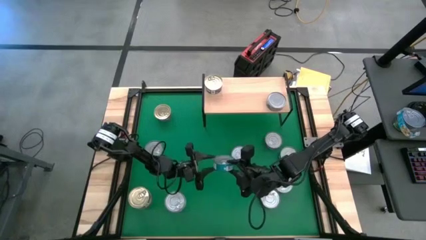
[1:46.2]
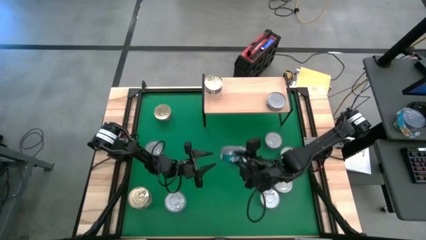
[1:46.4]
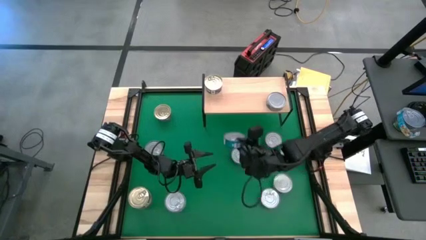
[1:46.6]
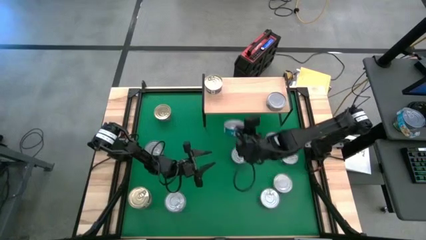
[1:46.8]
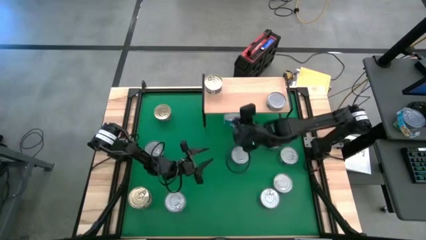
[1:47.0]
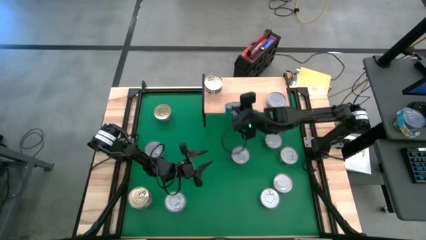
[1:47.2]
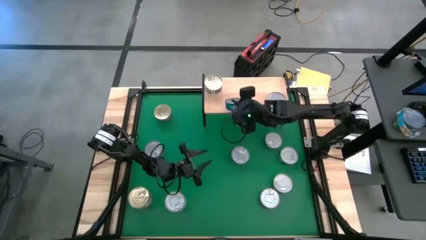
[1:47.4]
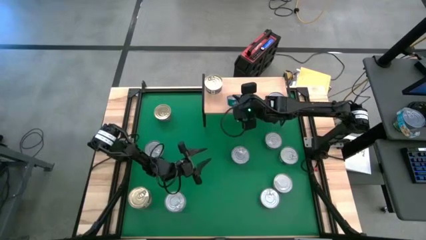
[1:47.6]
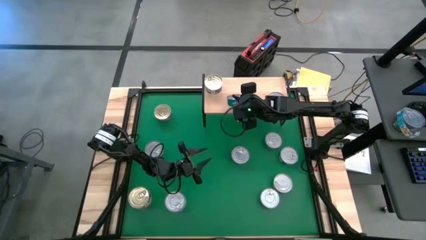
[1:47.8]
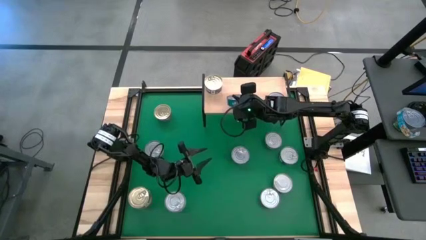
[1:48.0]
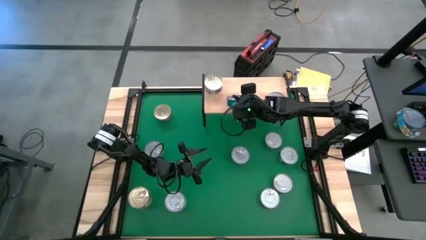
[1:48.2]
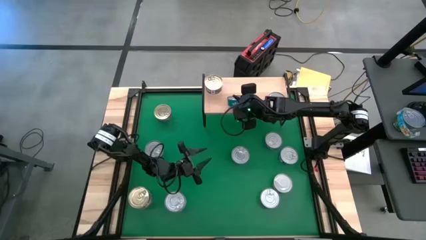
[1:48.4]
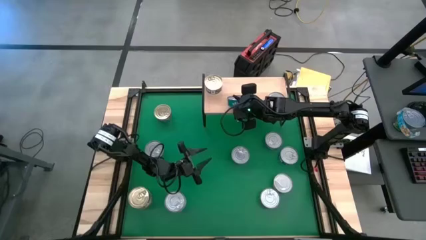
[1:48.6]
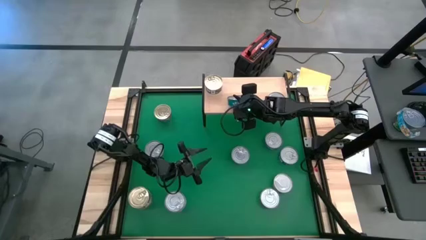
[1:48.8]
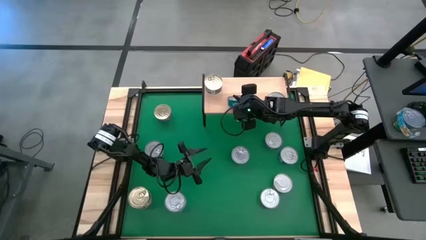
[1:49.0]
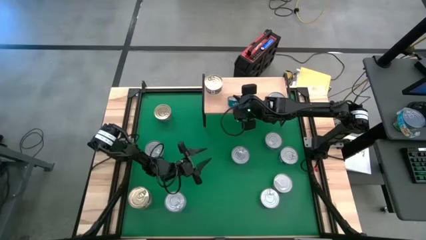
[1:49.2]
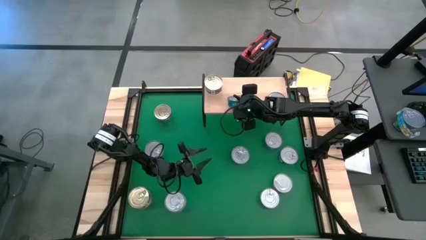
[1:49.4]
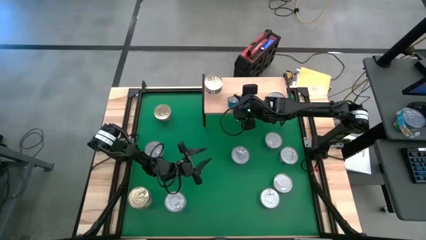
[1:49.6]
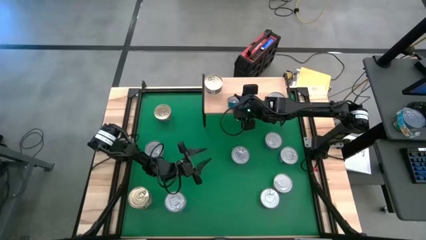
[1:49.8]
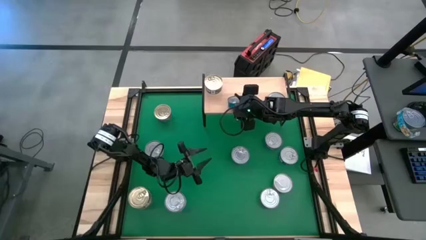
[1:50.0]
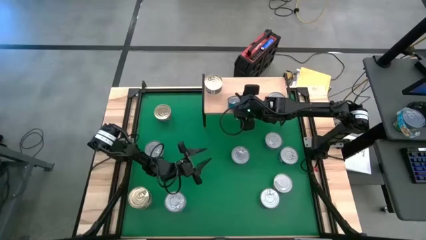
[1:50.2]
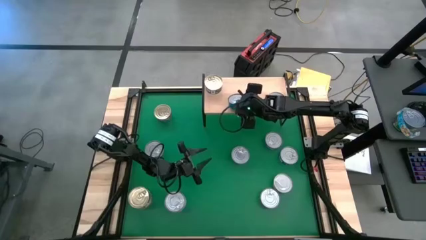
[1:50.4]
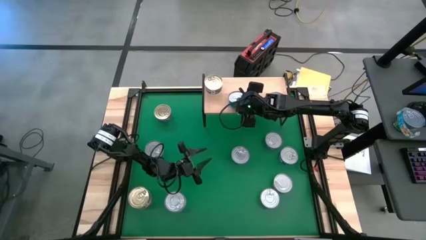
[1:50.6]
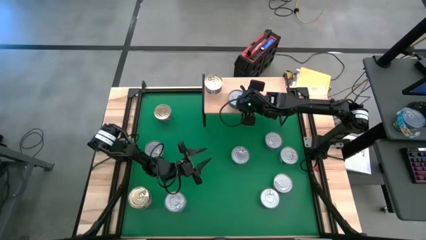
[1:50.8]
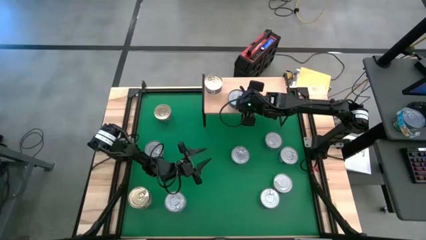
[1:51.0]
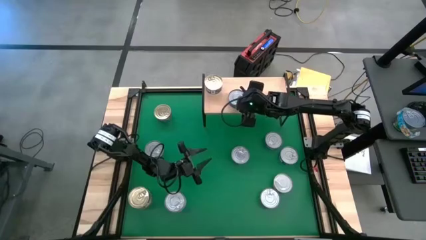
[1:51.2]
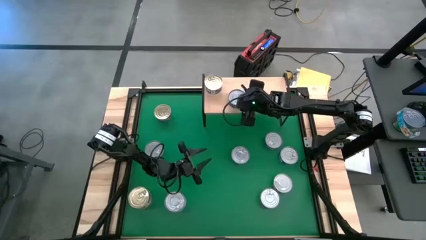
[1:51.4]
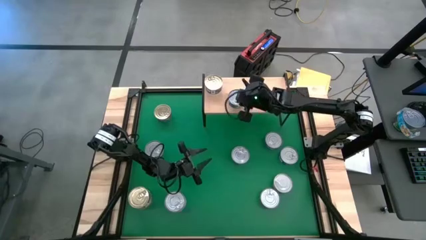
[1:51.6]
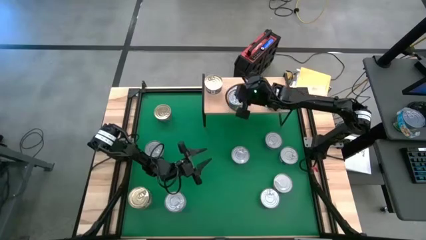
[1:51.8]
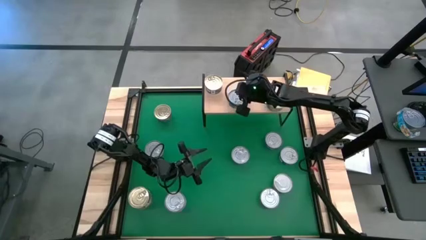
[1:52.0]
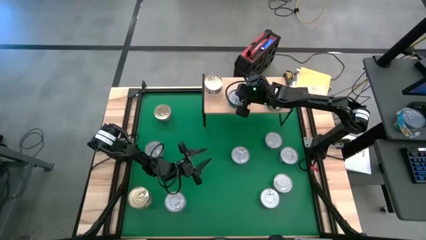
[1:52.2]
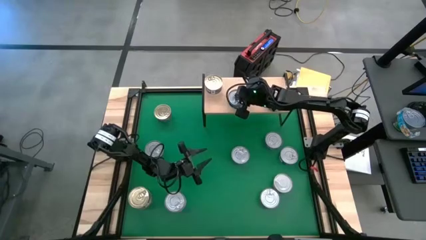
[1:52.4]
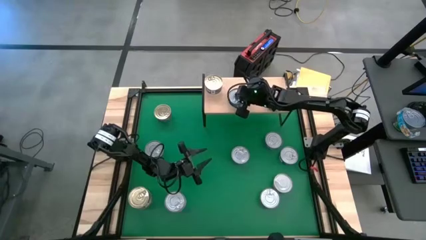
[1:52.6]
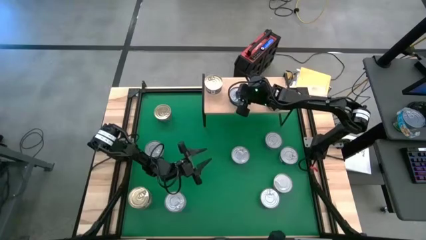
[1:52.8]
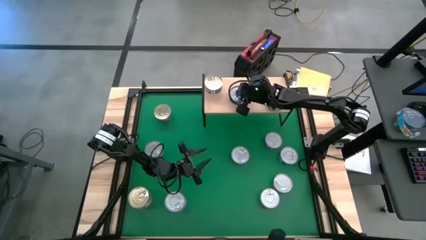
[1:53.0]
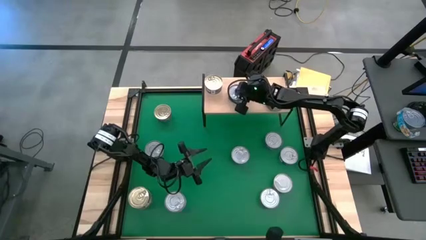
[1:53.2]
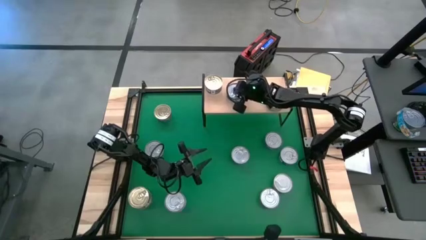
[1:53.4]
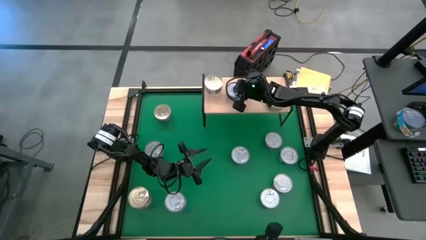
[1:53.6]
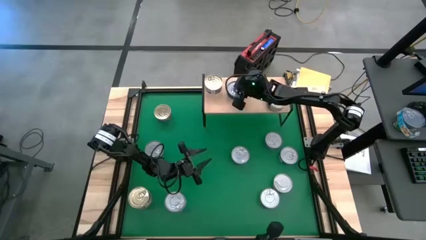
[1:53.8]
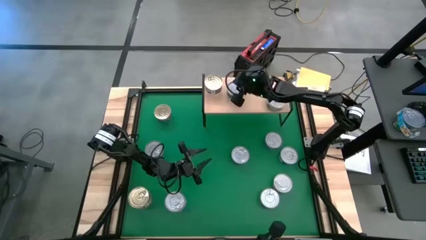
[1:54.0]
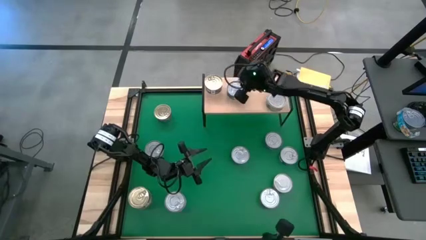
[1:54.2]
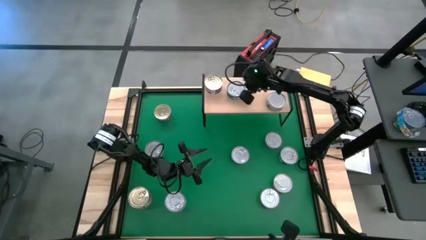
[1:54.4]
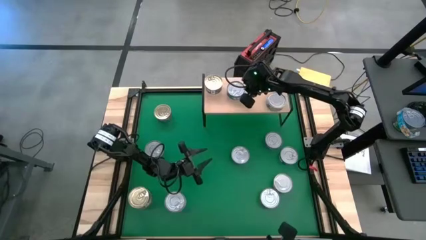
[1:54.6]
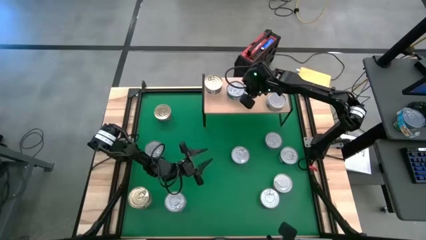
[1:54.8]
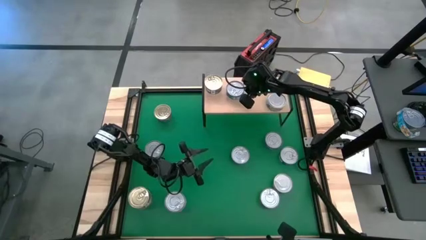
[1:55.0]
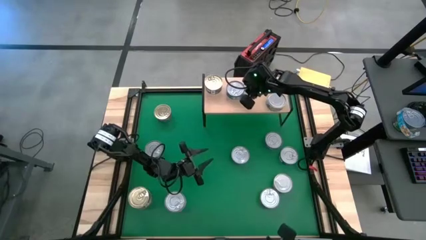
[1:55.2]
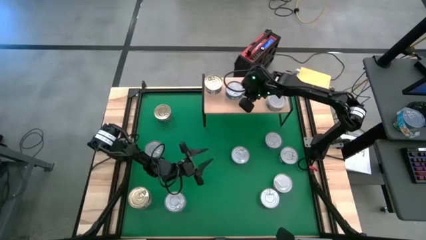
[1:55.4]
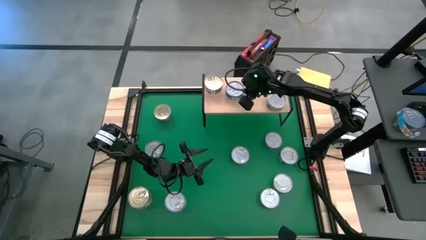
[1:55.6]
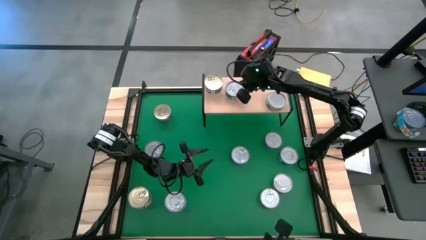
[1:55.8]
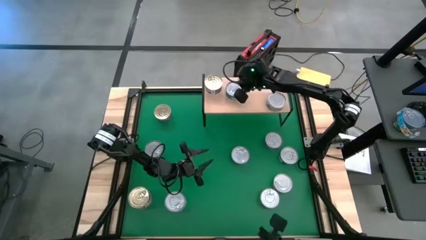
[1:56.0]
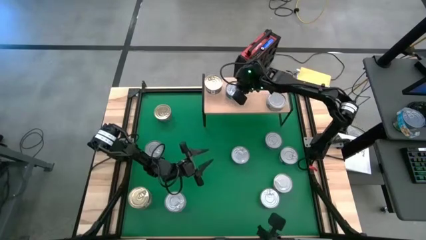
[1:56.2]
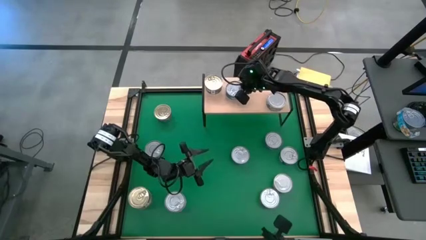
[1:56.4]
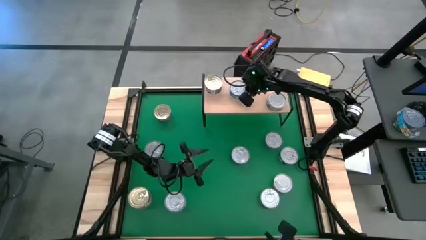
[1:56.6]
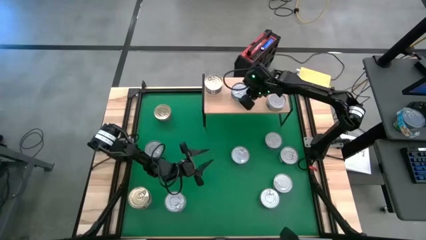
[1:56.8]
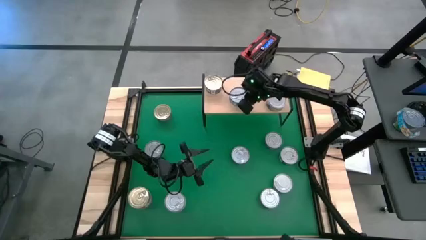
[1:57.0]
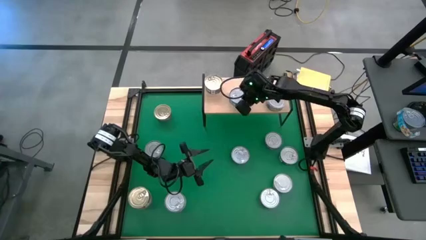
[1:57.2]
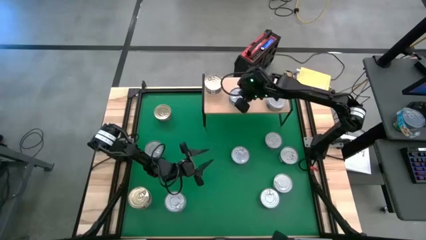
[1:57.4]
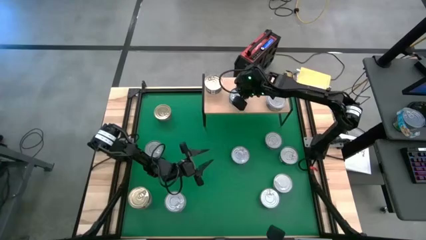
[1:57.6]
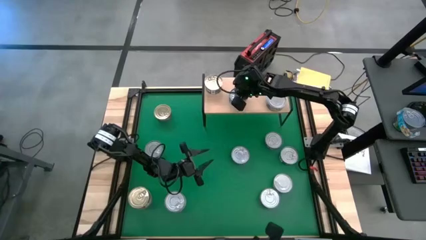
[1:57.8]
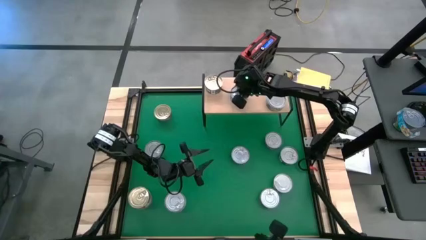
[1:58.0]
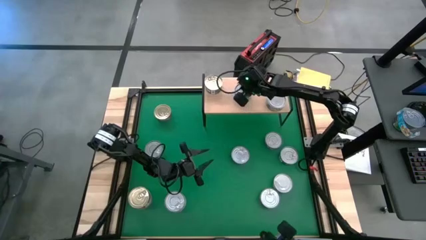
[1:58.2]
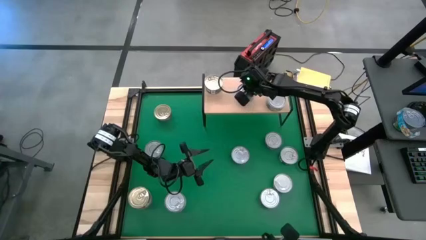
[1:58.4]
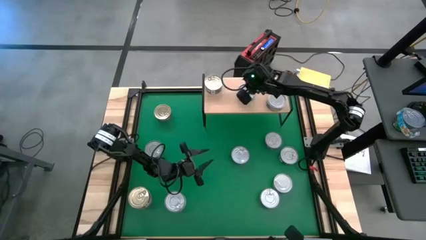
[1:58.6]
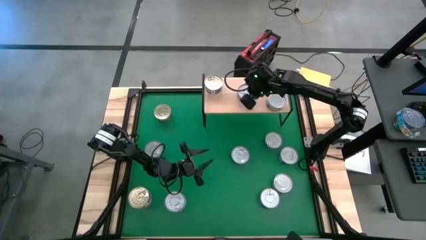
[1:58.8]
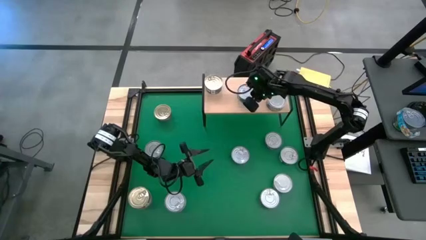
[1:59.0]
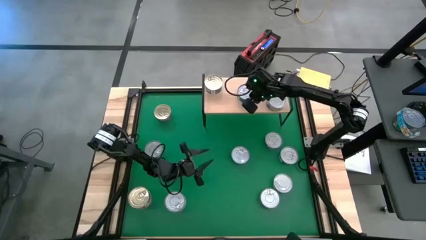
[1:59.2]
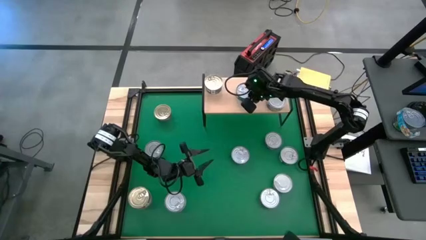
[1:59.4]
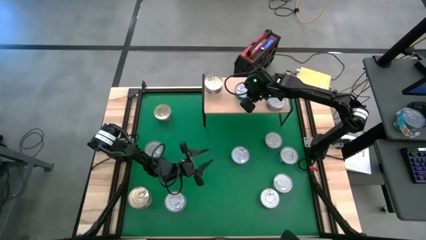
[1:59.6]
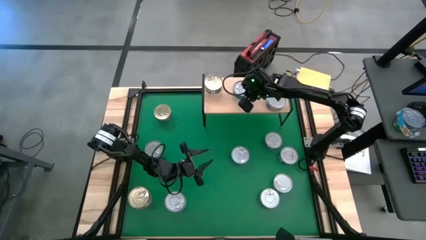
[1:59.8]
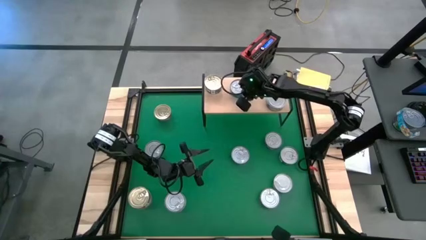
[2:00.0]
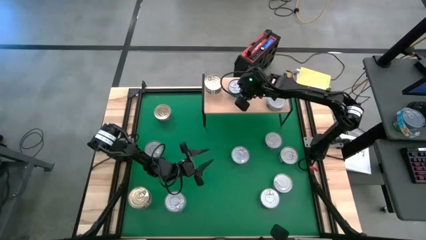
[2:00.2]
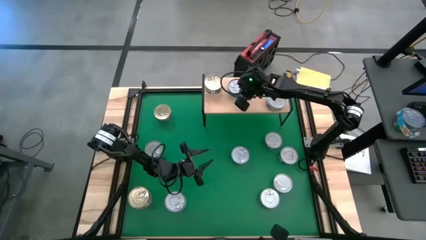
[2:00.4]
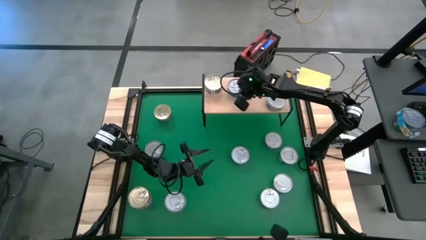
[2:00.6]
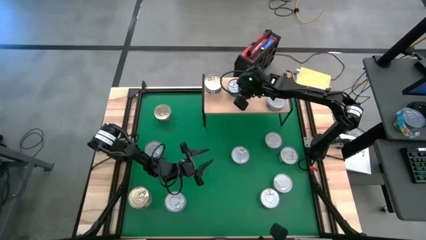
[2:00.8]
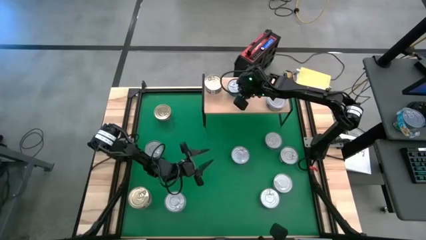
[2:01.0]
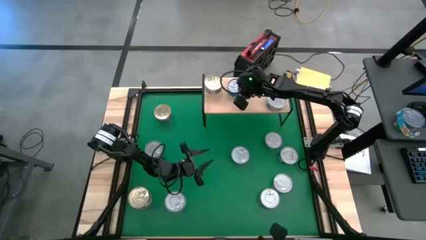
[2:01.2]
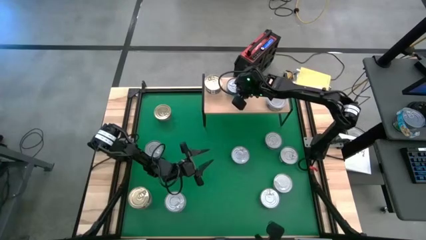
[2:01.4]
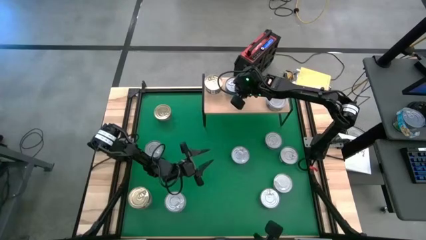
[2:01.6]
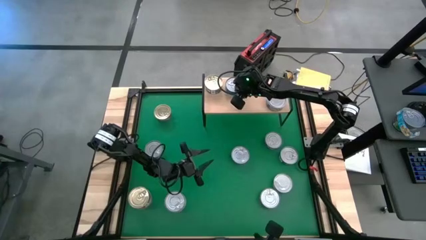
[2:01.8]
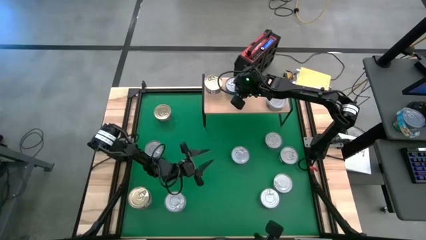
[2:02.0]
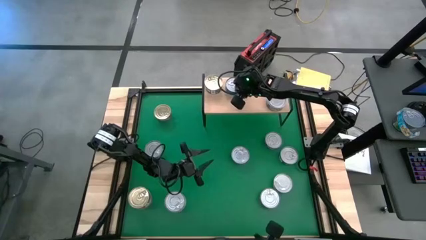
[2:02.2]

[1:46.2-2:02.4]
Task: Stack canned seafood by type on shelf
Put the green/blue tuna can on the shelf
